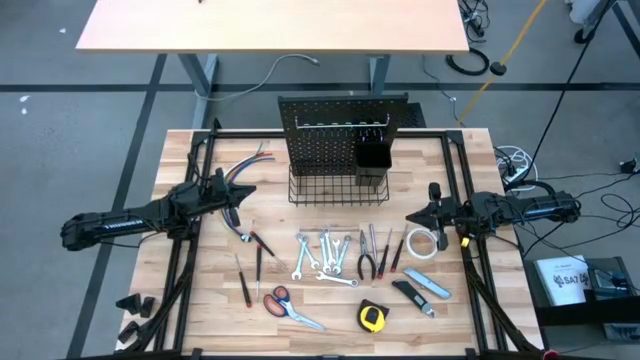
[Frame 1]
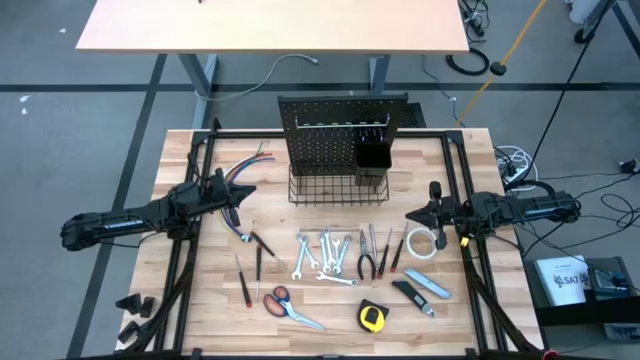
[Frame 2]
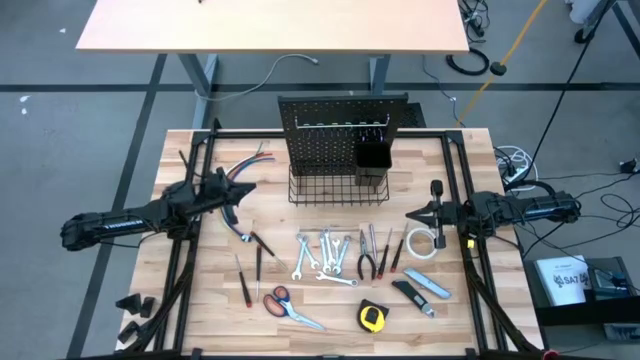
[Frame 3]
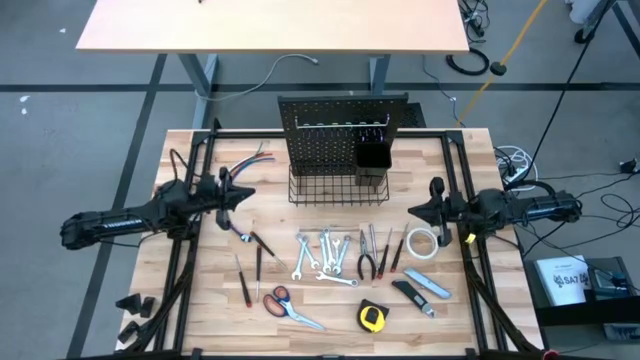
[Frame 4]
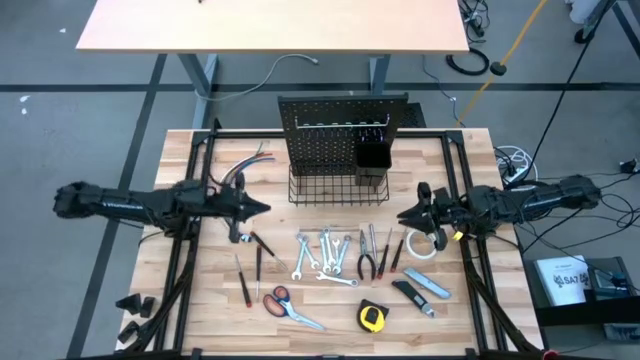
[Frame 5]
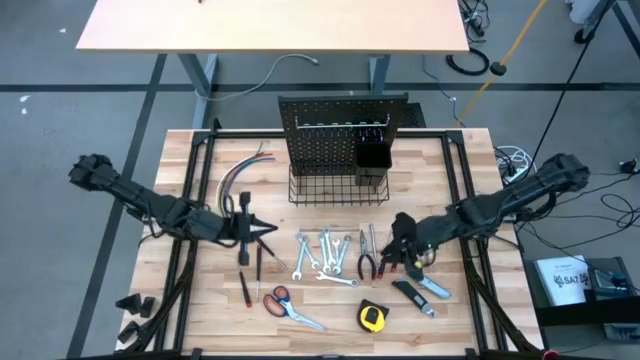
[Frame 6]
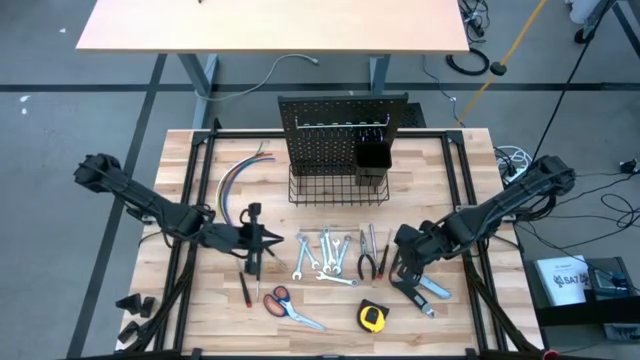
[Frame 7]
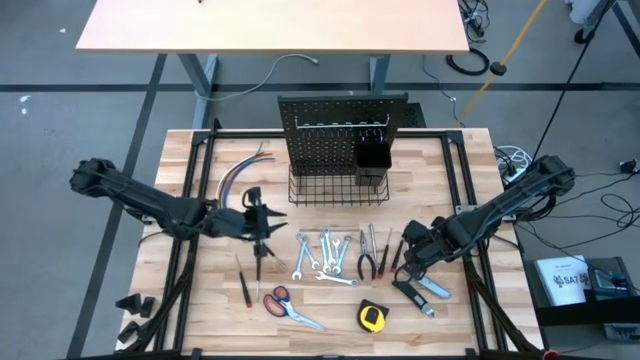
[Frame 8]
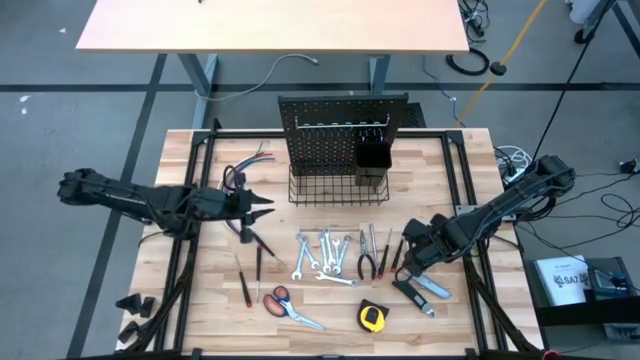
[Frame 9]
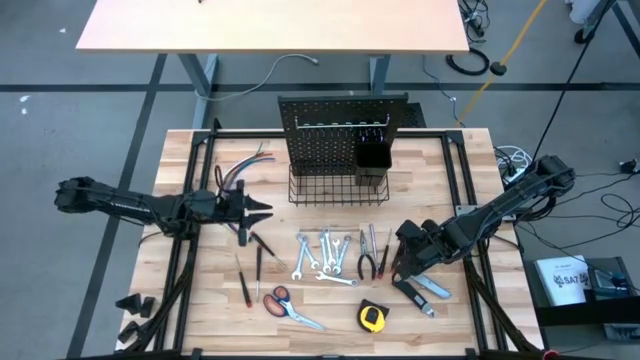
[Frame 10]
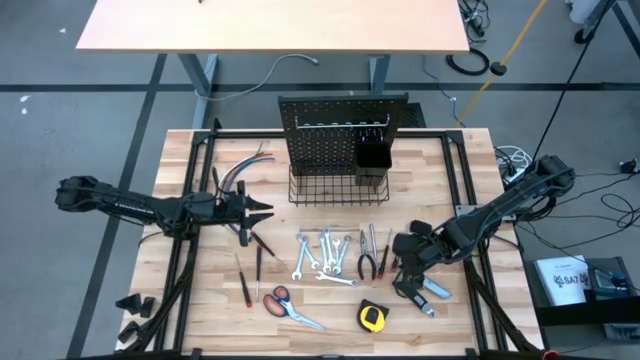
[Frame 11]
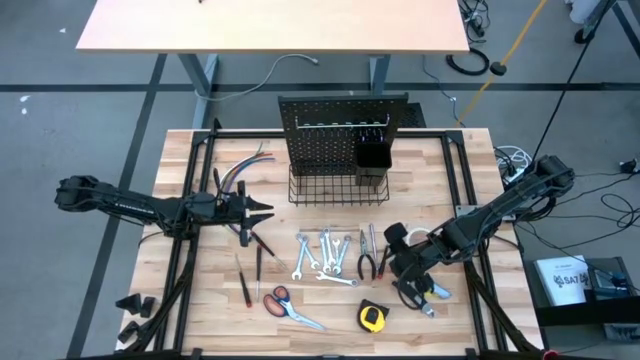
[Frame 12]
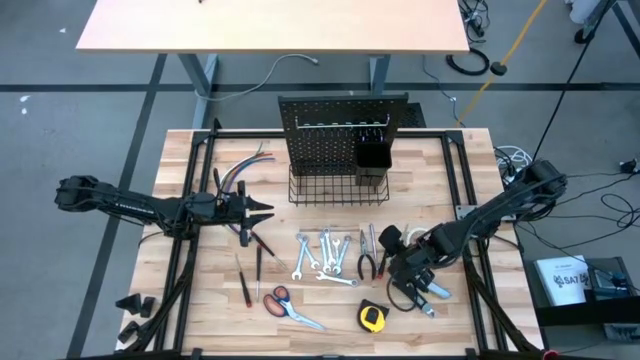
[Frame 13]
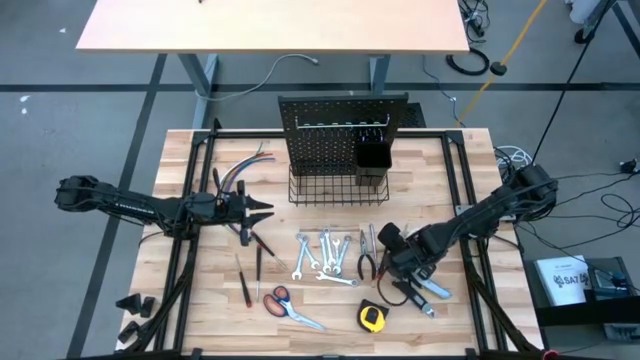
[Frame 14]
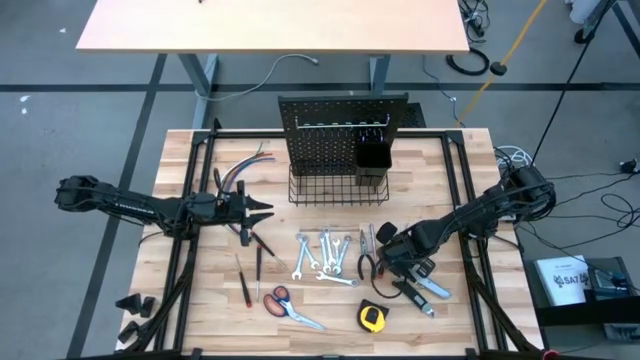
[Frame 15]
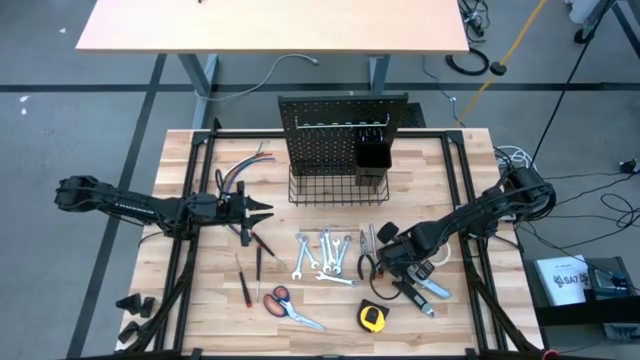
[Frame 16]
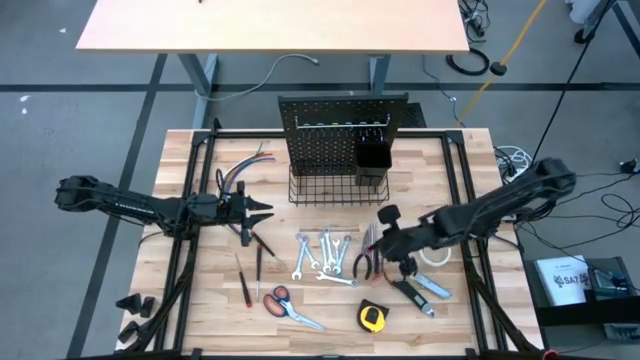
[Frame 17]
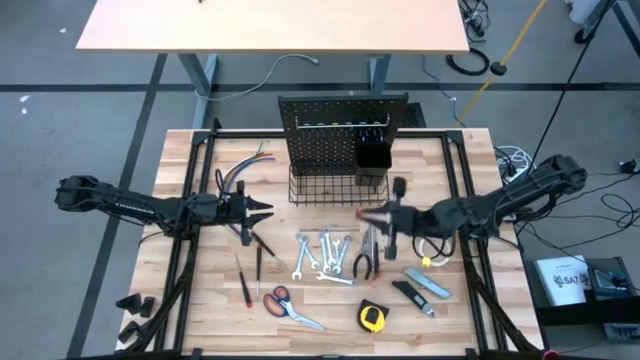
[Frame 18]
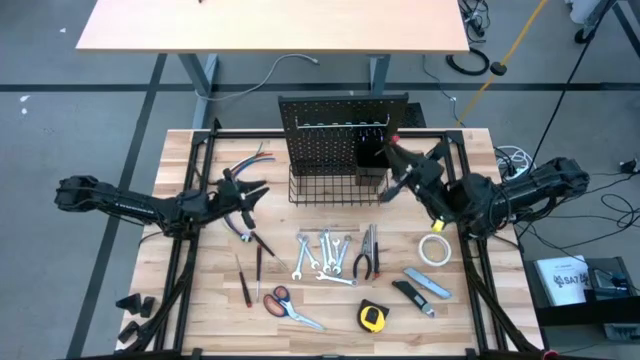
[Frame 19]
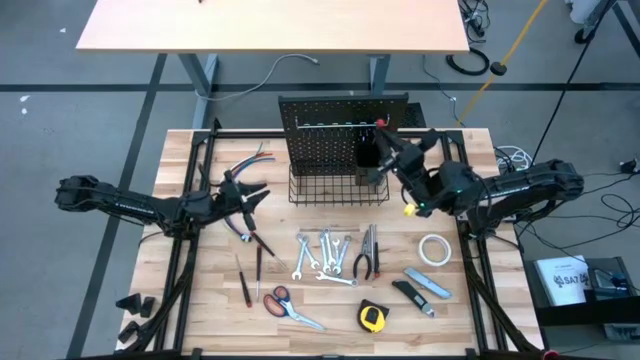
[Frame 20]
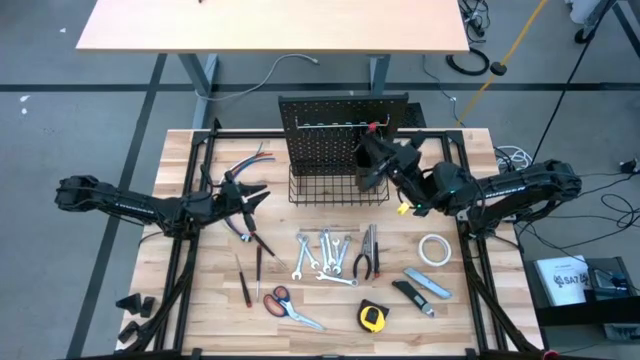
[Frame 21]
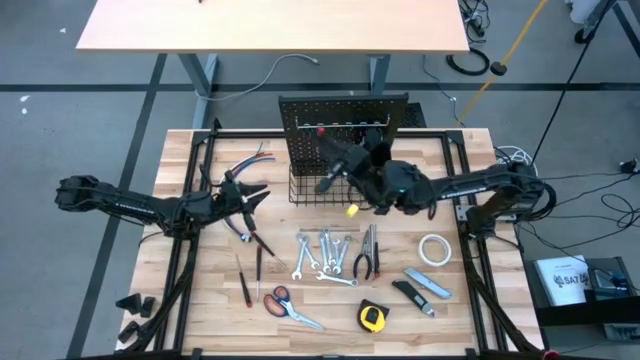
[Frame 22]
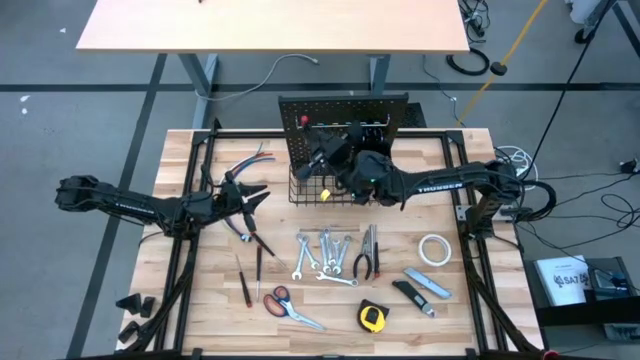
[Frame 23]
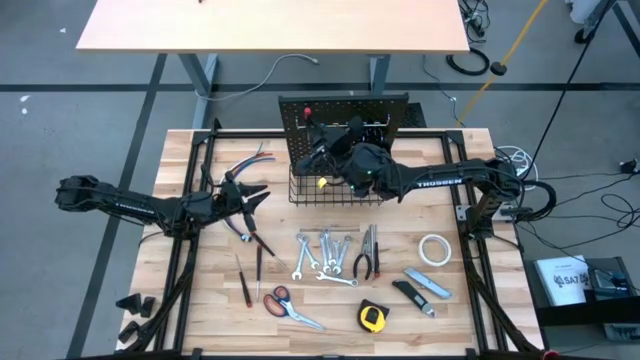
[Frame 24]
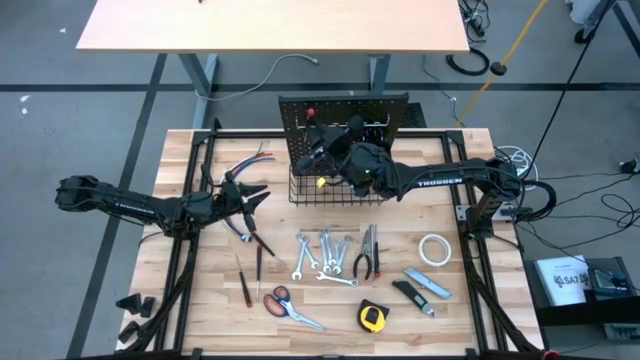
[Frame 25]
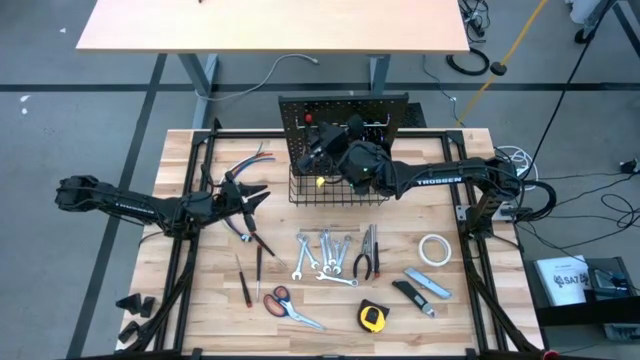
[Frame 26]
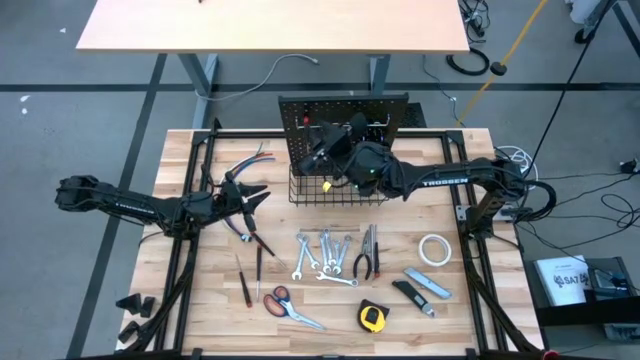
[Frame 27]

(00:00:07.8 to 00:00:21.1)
Task: Hang tools onto peg board
Hang the nut driver on the pegboard

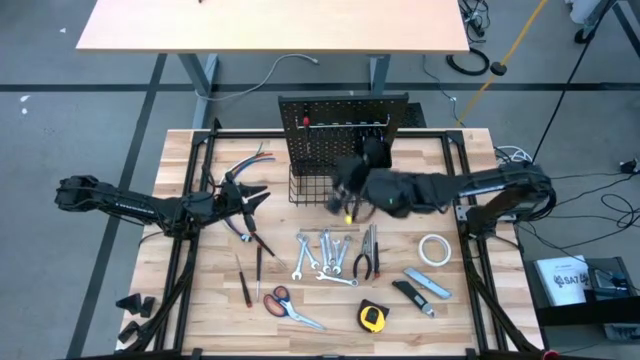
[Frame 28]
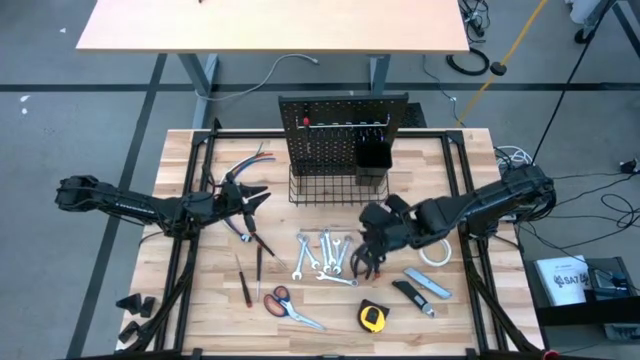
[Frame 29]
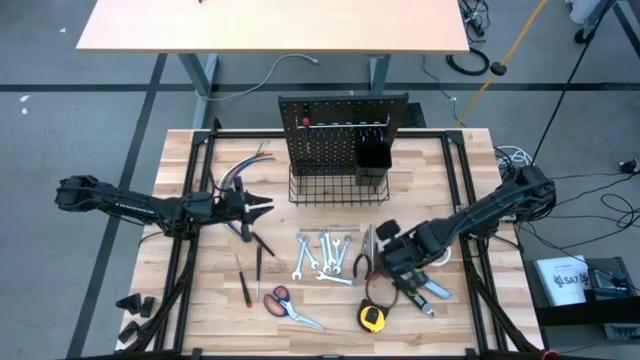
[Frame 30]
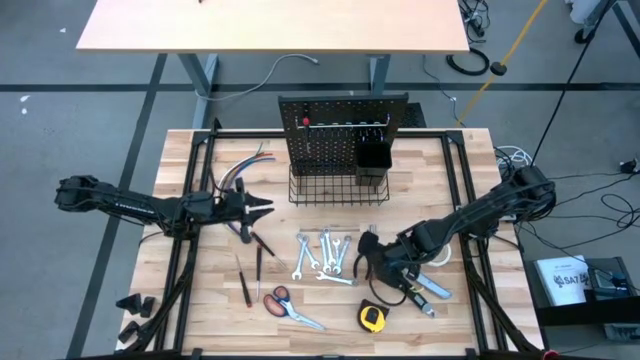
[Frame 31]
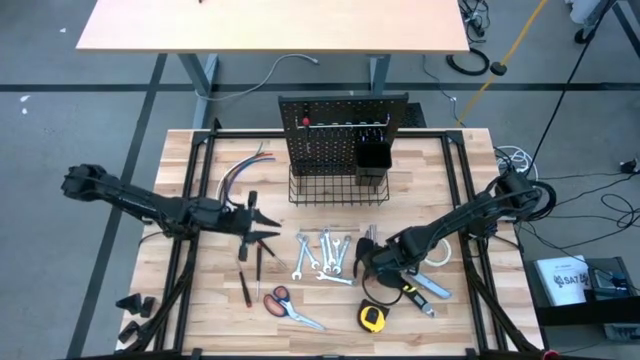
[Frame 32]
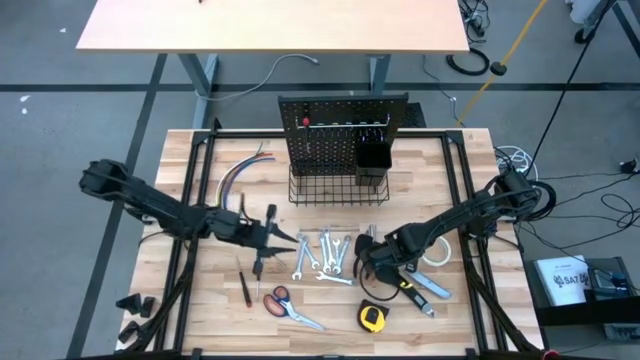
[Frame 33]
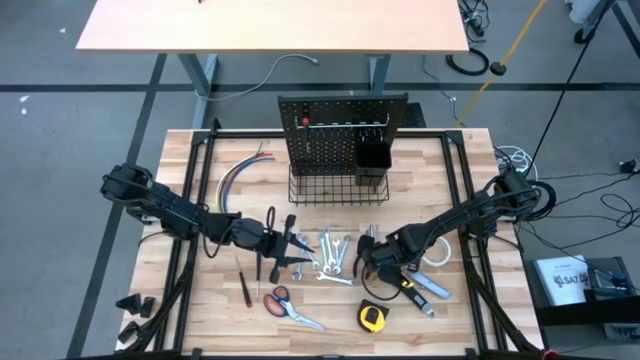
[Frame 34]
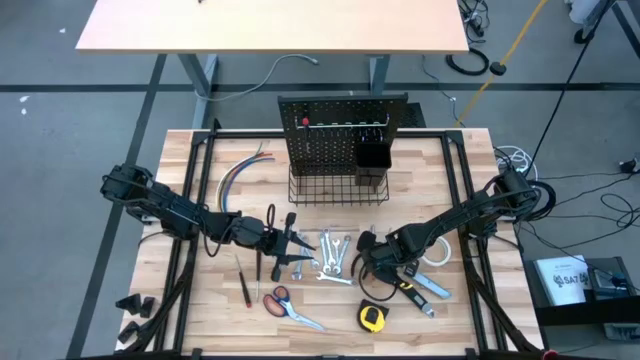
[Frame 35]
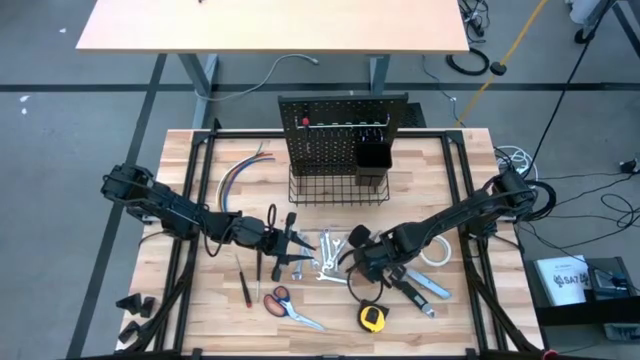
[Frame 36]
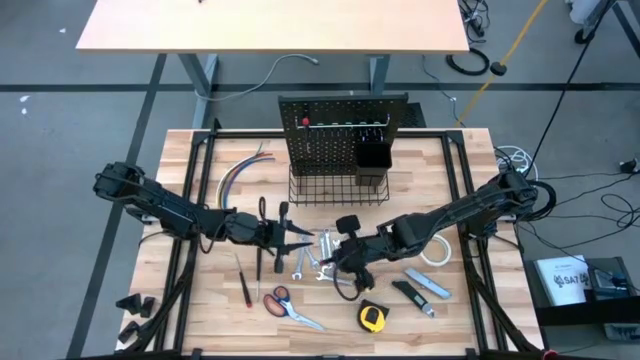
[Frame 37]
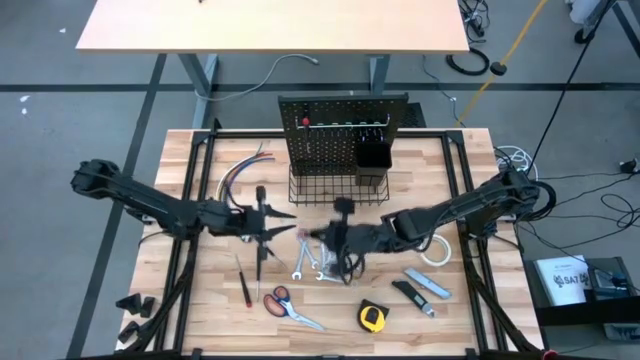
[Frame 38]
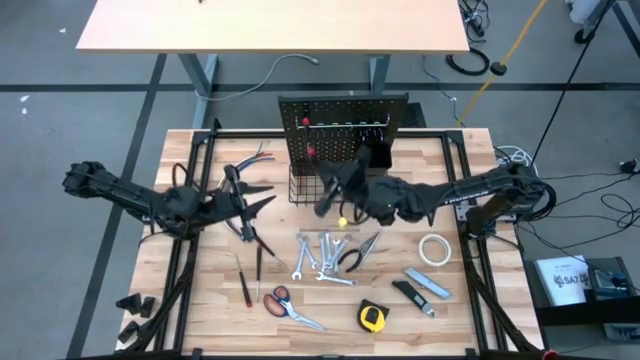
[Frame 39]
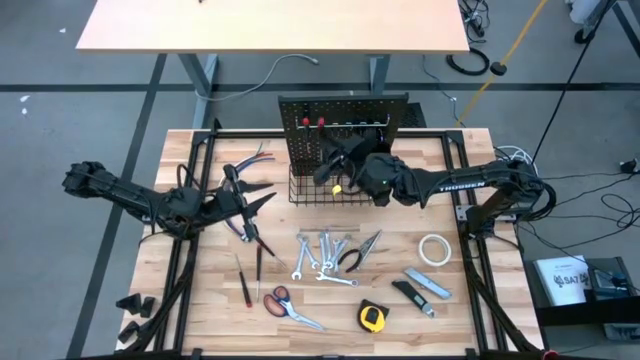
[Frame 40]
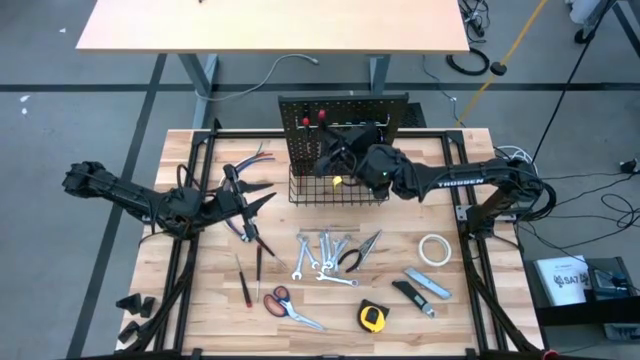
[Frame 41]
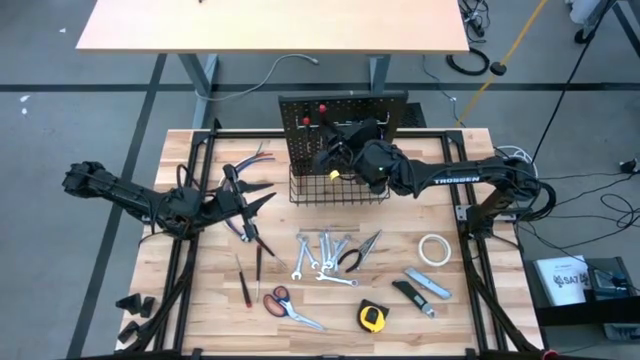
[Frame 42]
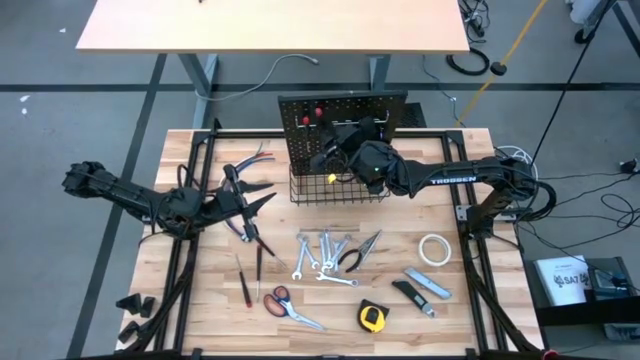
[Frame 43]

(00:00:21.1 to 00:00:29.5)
Hang the nut driver on the pegboard
